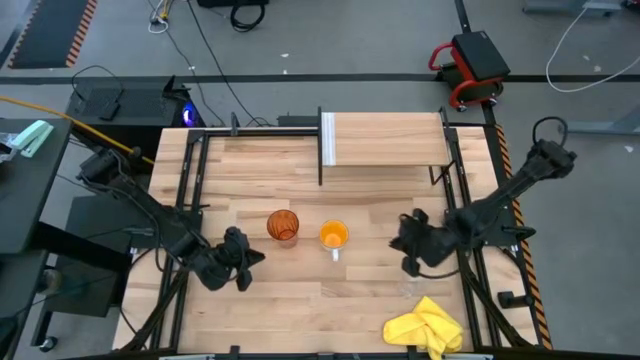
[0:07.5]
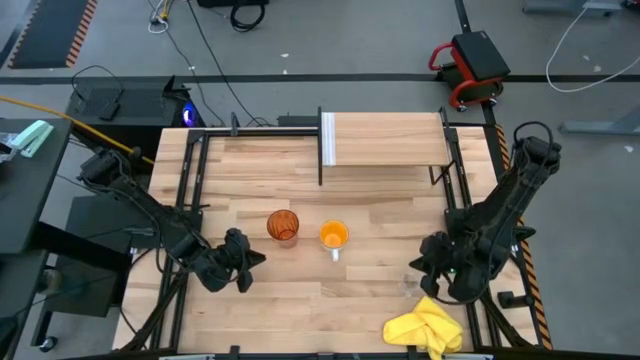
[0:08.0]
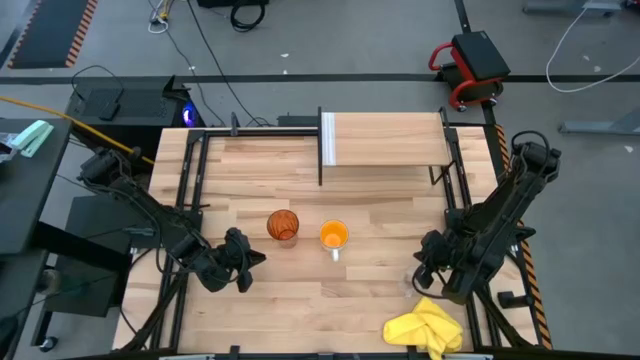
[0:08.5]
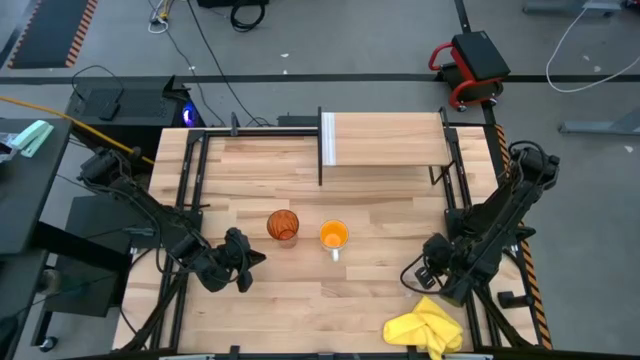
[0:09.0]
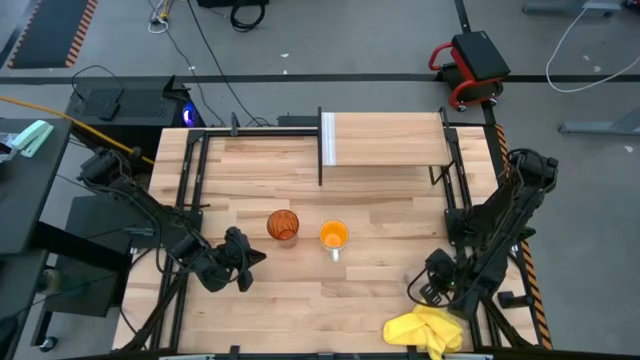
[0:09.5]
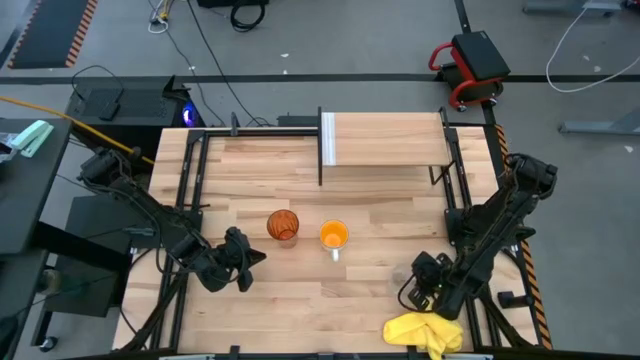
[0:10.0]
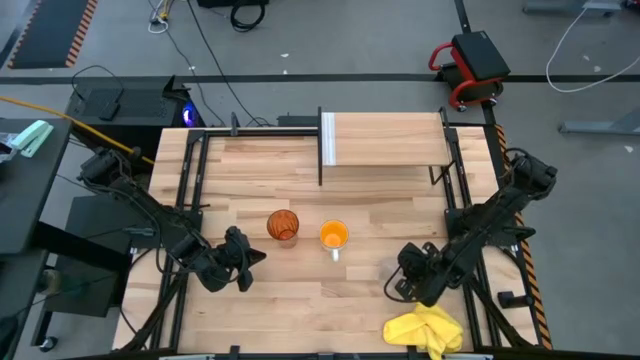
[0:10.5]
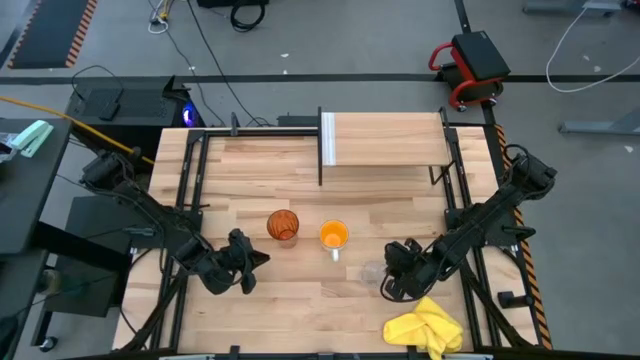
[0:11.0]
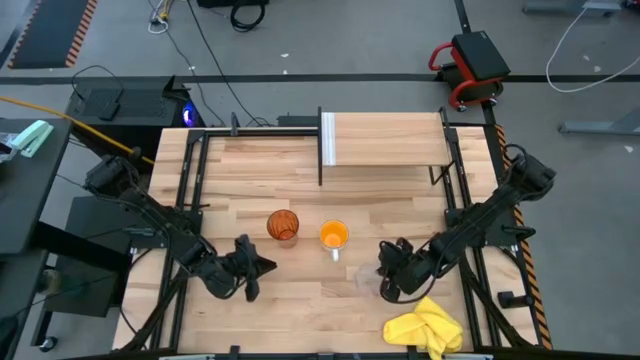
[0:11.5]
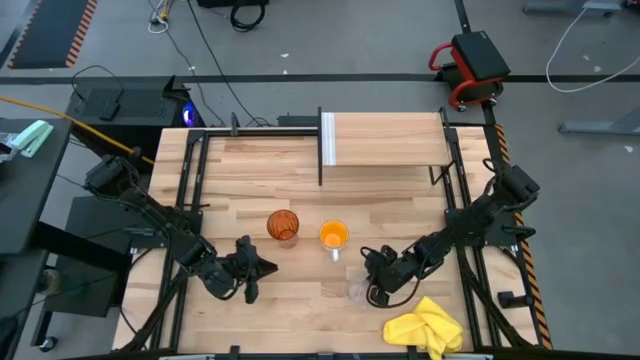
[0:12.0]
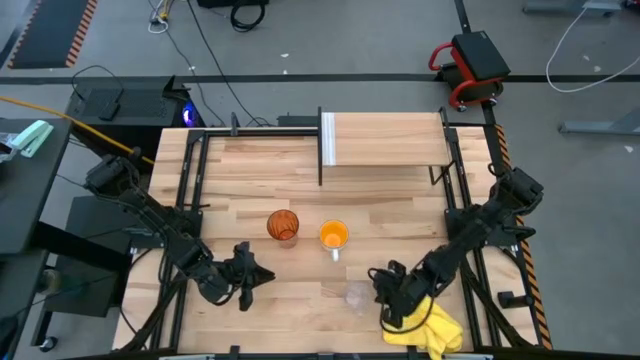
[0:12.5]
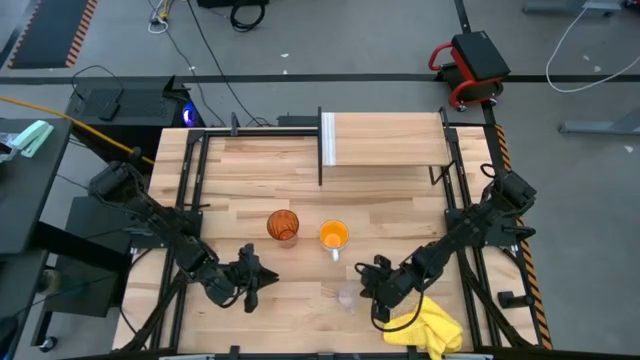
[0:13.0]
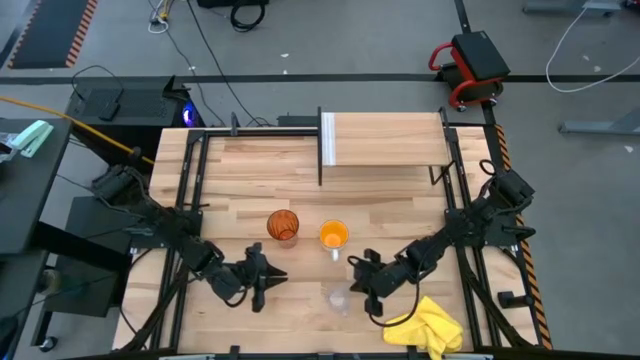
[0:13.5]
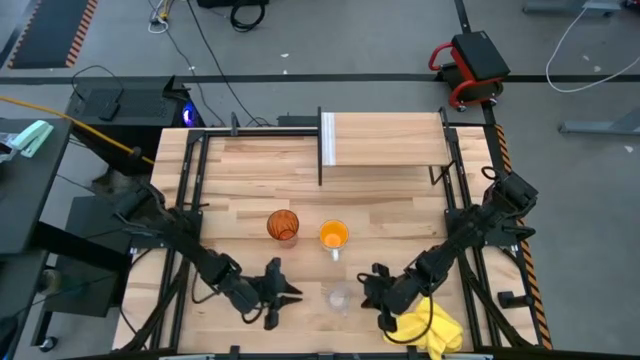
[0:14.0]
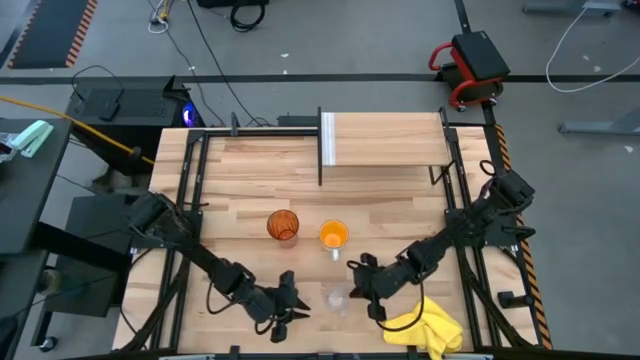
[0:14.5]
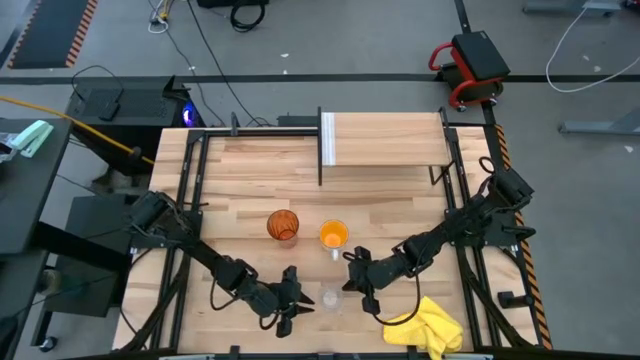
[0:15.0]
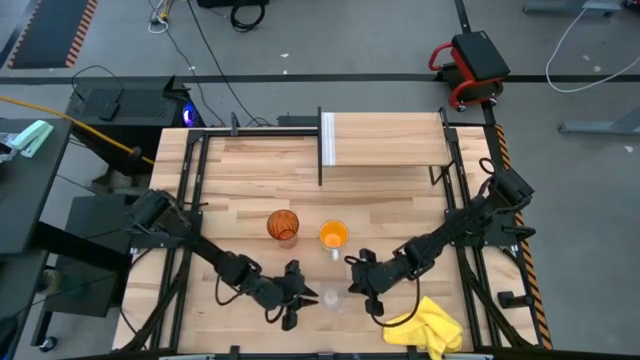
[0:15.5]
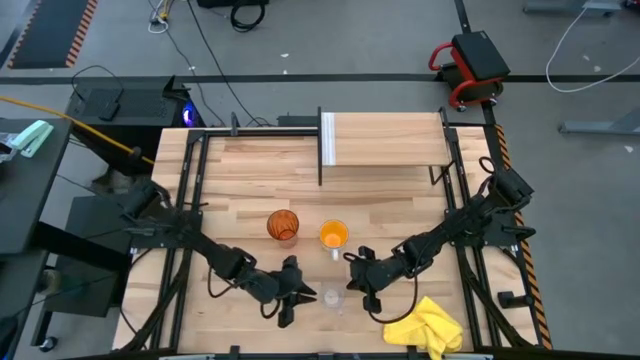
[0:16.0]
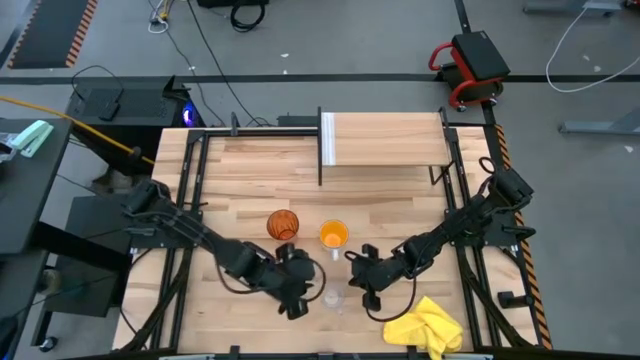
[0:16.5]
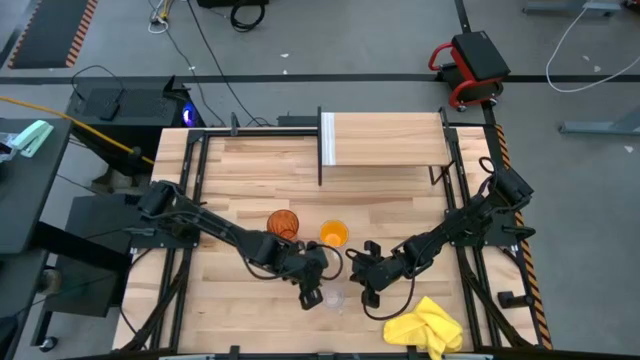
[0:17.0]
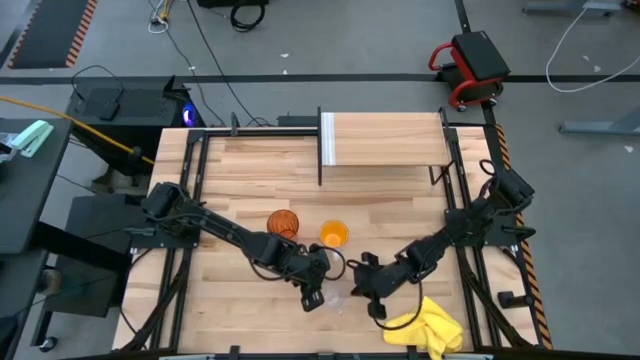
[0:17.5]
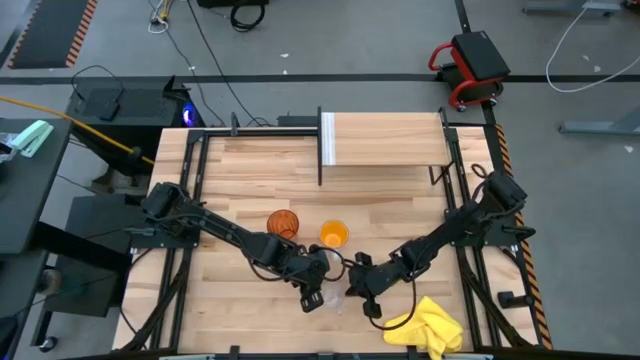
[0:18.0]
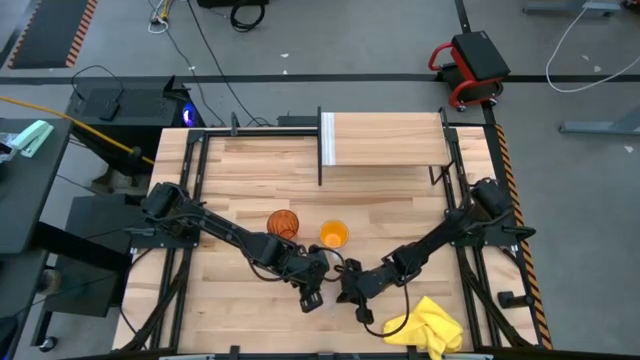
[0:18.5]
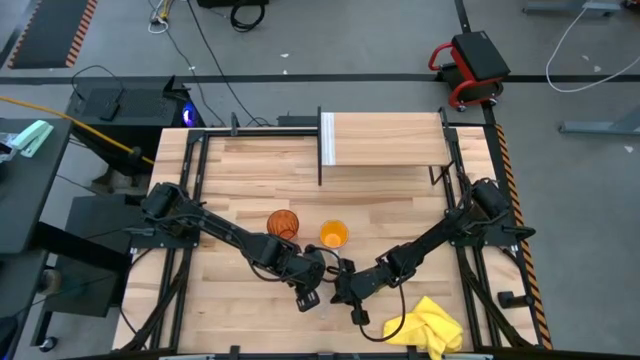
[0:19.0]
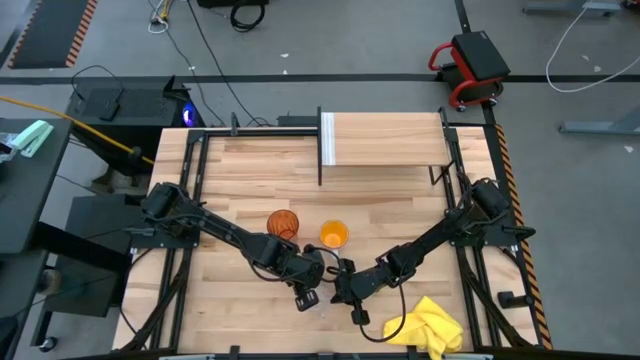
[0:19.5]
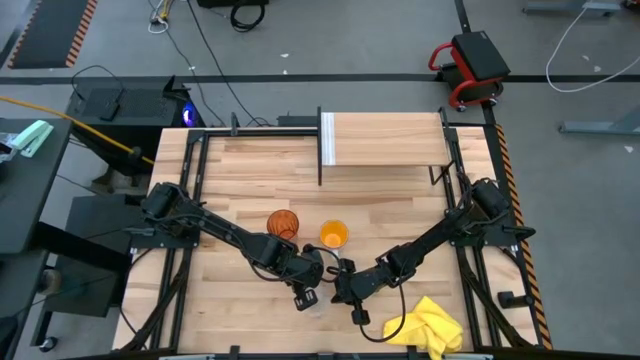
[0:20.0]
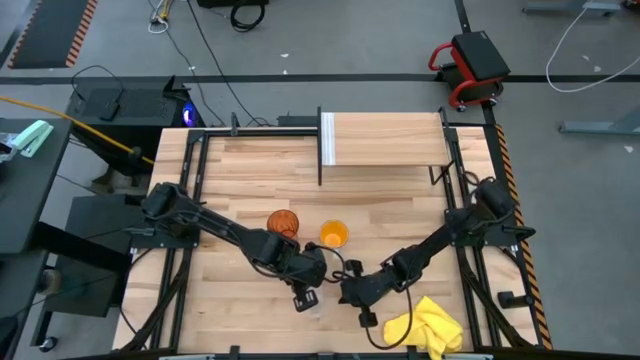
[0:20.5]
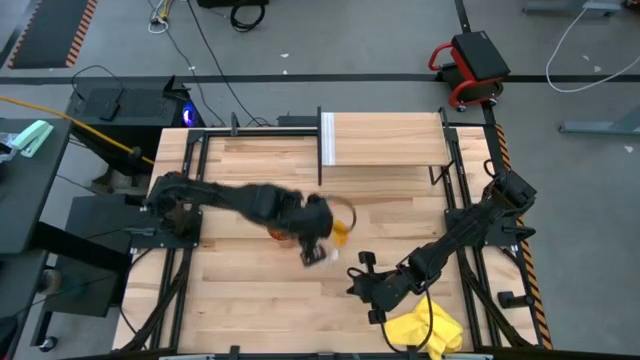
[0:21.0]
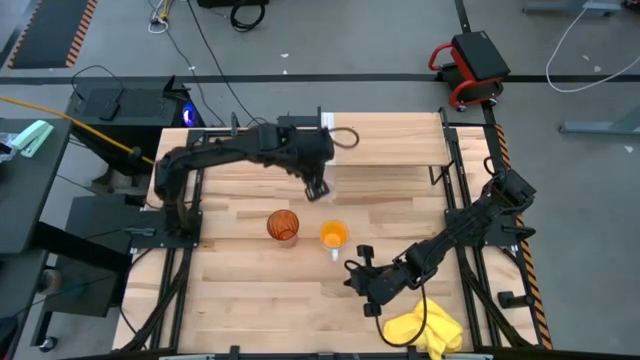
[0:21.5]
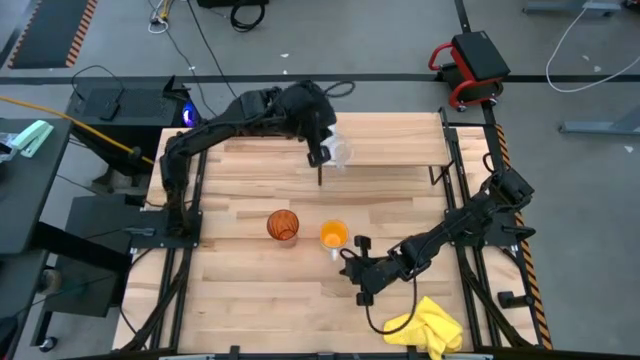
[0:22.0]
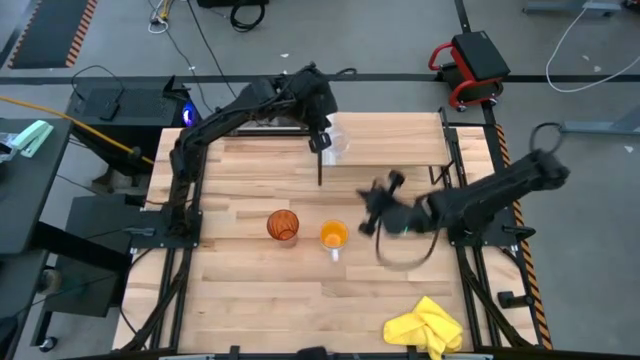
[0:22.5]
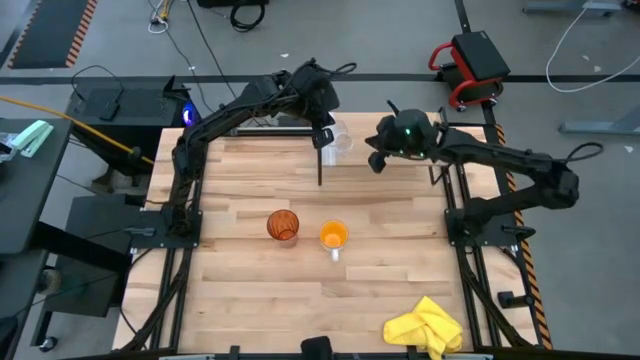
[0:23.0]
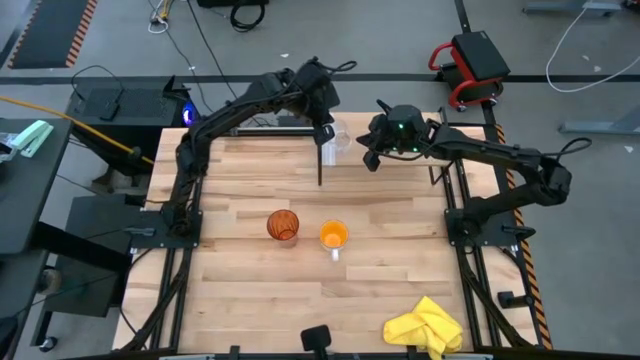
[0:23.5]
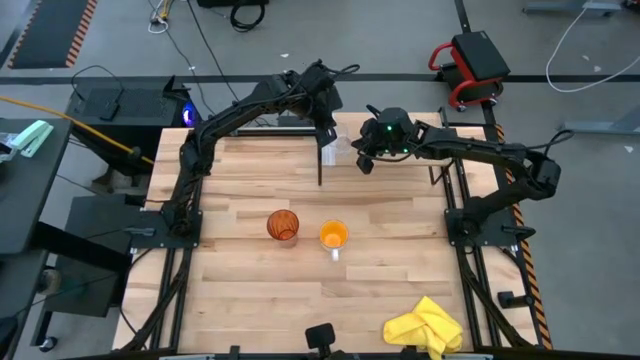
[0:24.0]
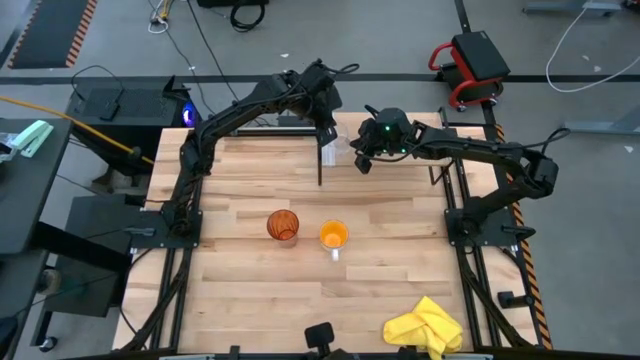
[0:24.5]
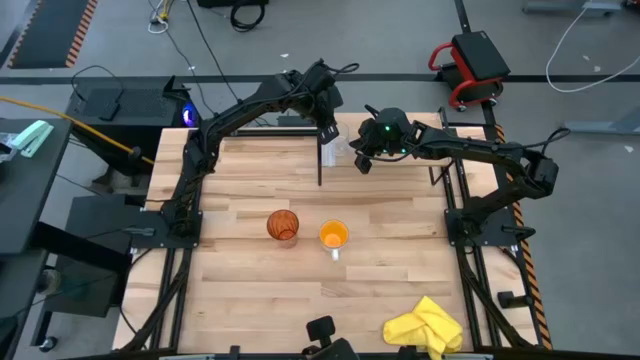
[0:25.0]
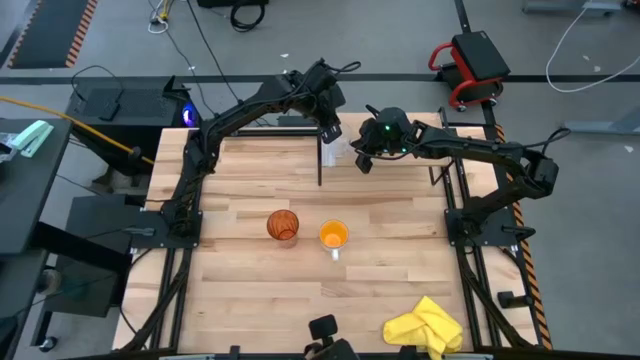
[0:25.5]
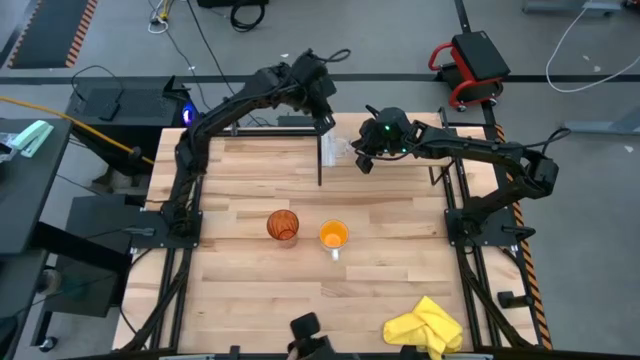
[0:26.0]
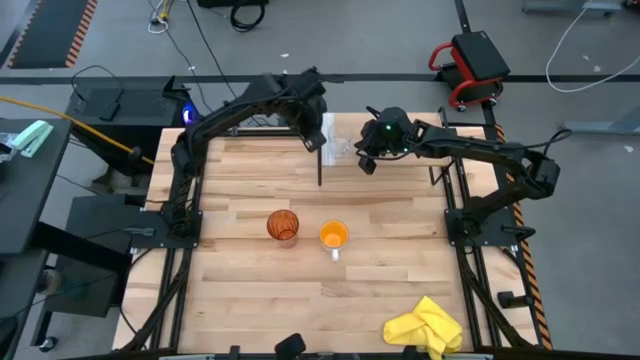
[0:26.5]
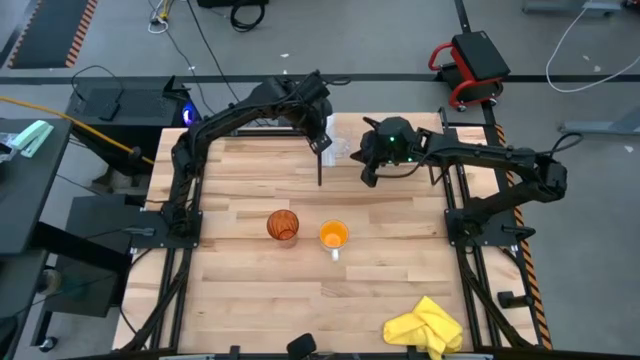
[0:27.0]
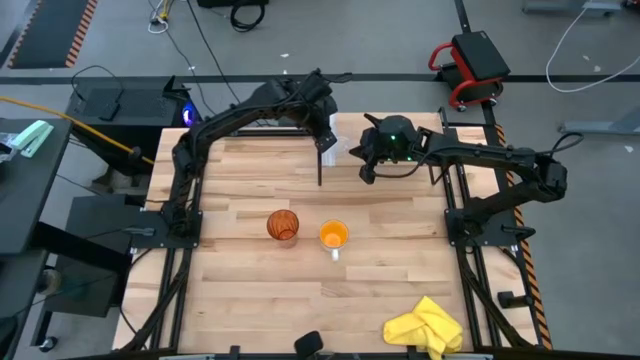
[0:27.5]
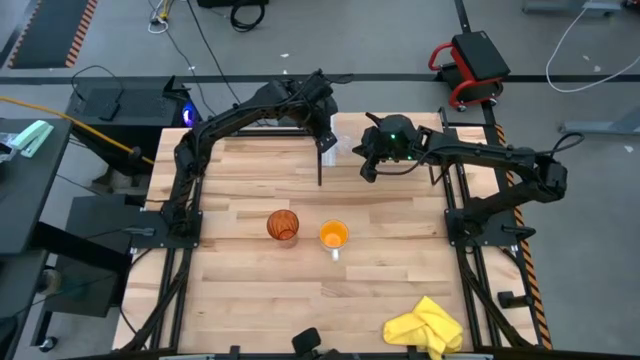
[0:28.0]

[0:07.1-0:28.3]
Task: Stack small to large cups/mugs on shelf
Put the transparent cup on the shelf
